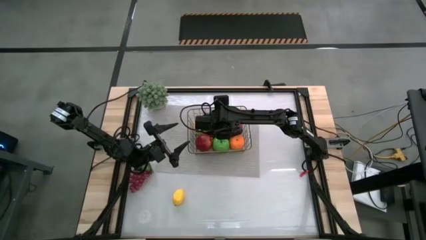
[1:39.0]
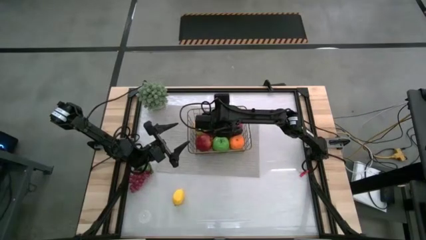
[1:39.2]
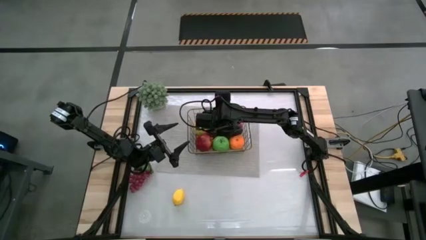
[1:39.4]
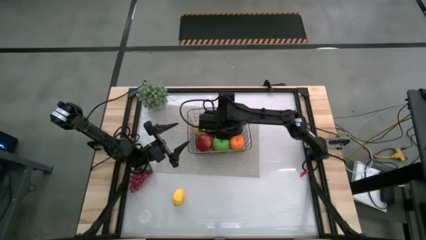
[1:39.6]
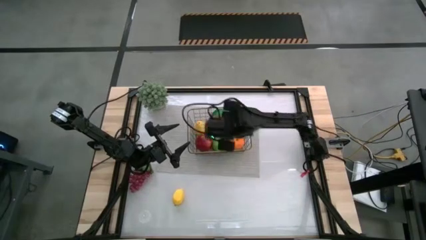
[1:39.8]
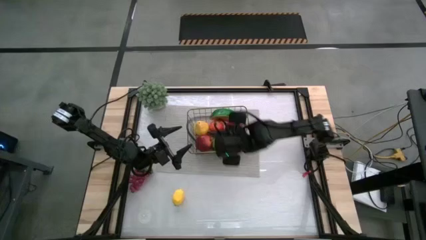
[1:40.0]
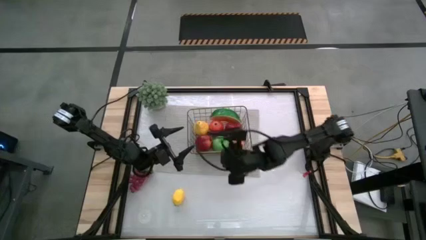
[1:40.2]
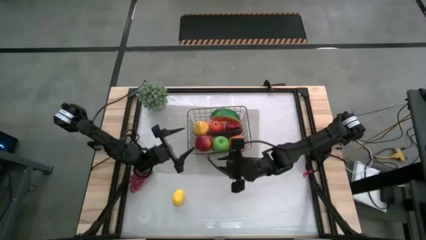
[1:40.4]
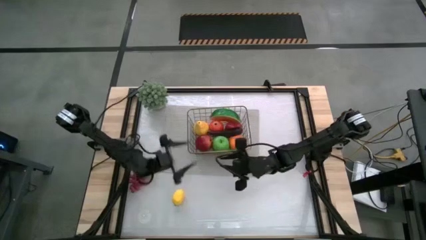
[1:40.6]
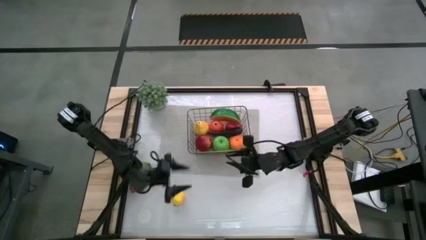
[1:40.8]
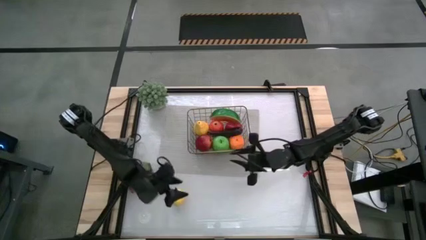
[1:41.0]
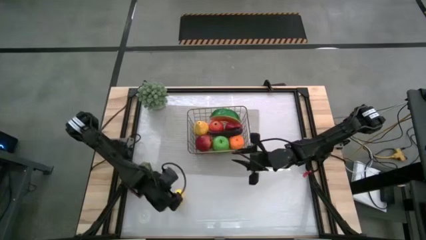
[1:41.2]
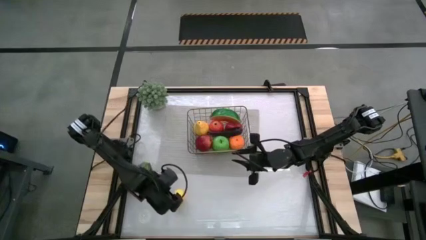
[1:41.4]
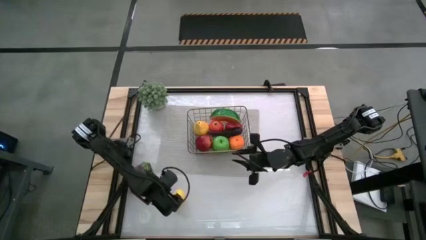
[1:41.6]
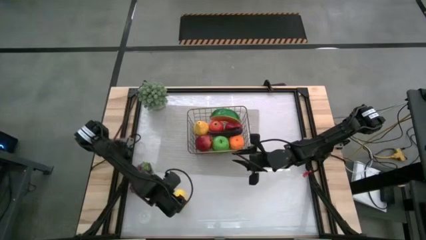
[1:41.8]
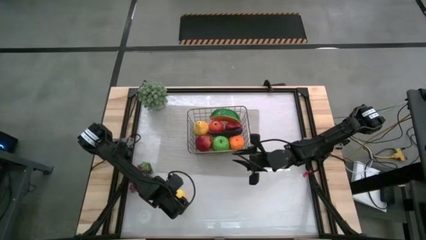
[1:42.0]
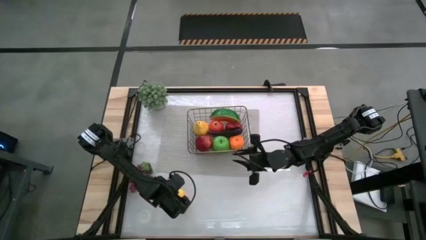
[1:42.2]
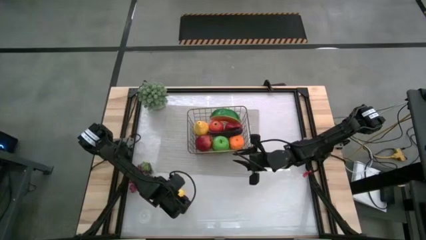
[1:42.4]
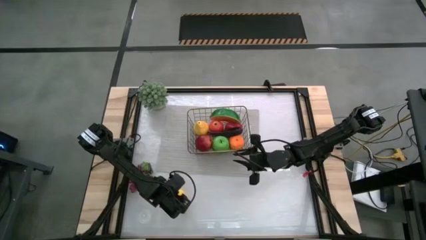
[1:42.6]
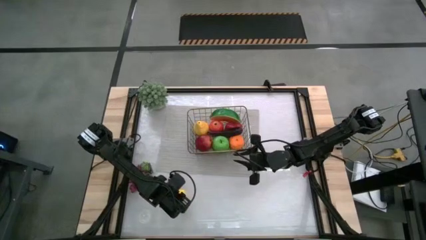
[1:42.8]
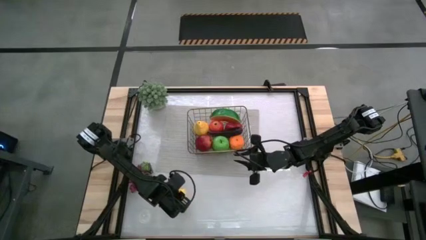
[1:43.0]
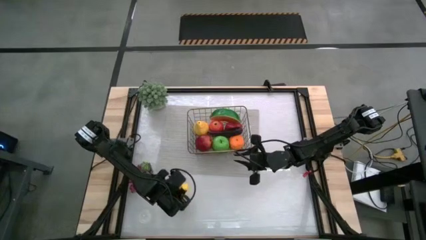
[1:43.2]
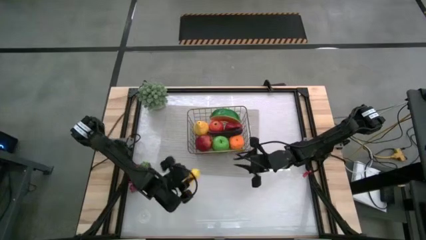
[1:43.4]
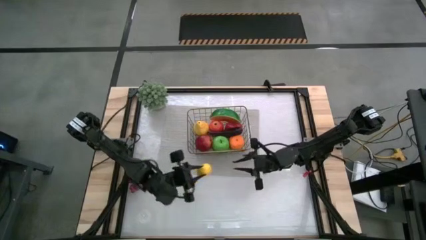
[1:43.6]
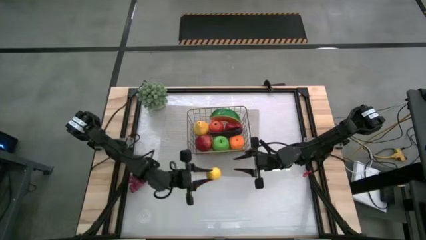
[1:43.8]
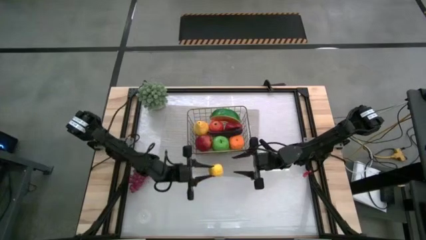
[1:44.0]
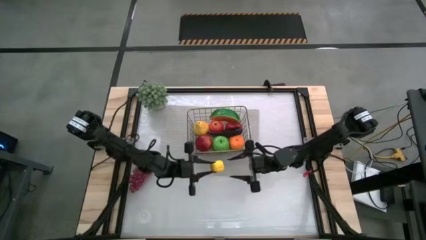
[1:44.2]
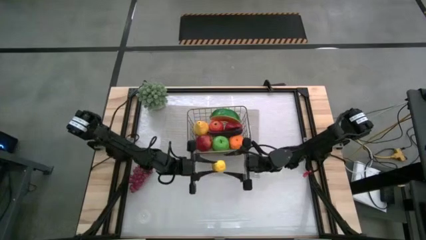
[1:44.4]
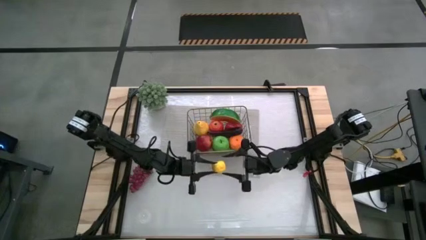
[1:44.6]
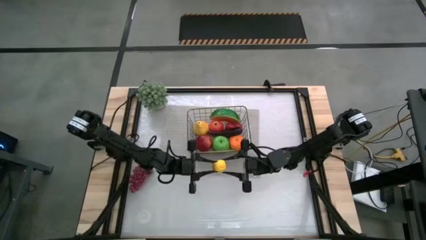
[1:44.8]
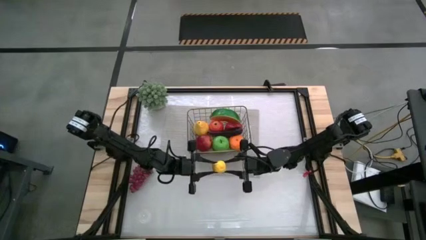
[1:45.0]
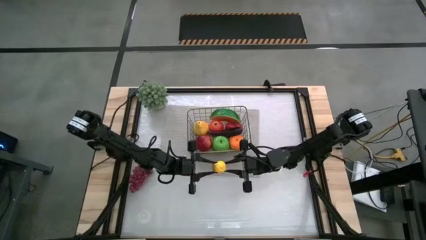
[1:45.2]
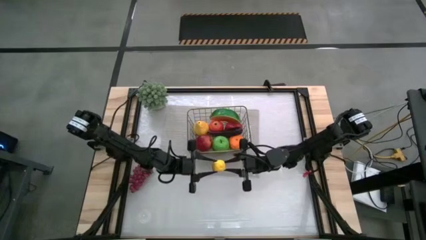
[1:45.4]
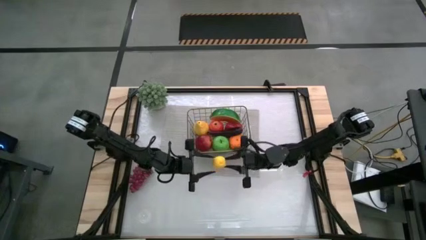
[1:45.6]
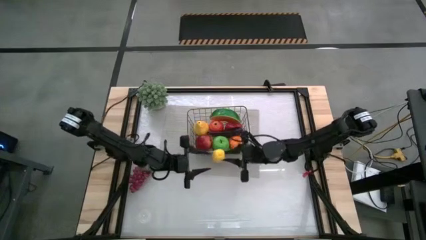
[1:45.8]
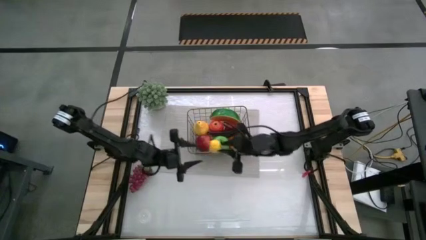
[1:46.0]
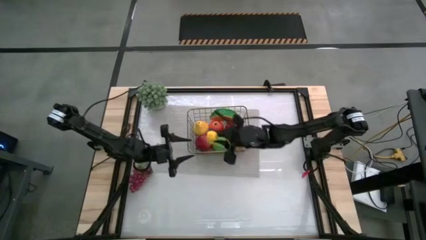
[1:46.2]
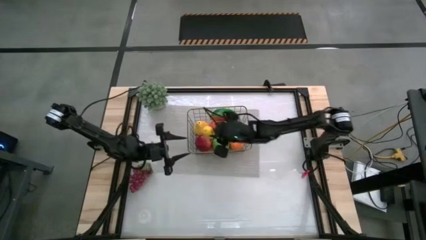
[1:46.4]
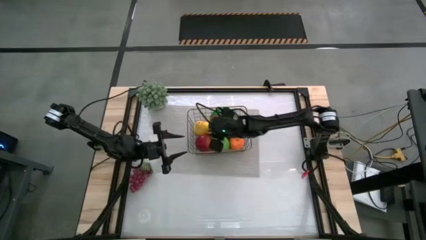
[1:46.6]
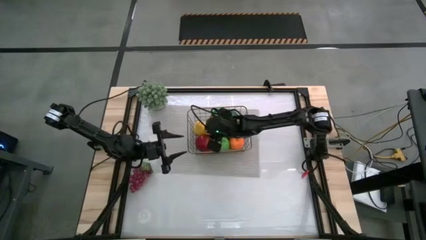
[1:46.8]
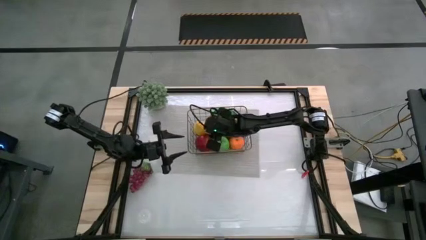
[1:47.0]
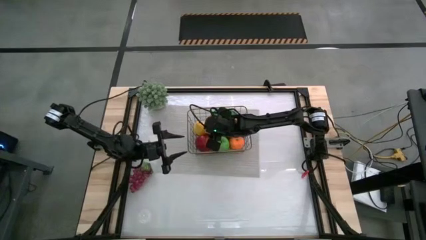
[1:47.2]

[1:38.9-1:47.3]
Task: Build produce basket
Put the lemon into the wire basket

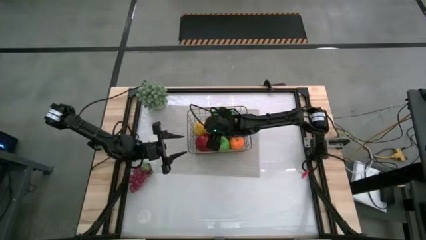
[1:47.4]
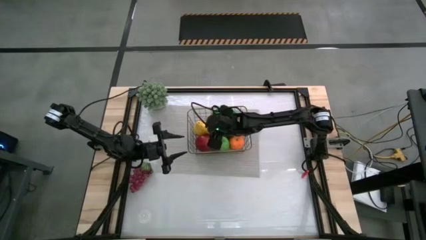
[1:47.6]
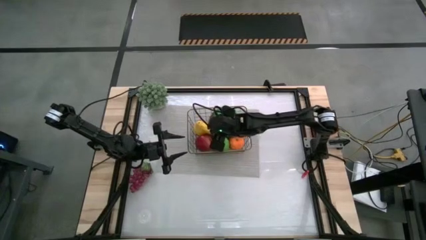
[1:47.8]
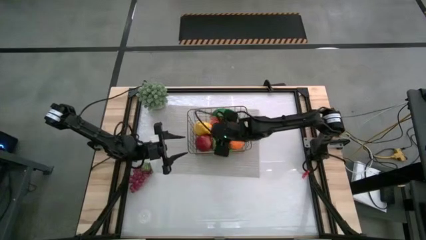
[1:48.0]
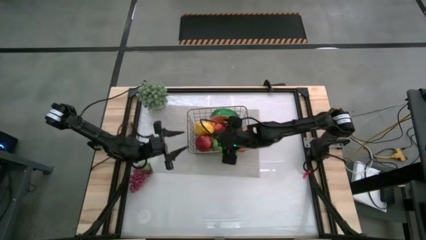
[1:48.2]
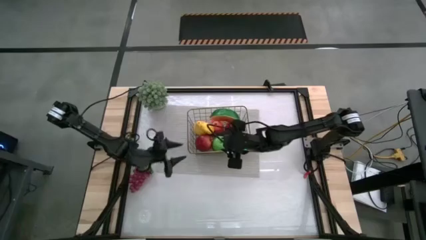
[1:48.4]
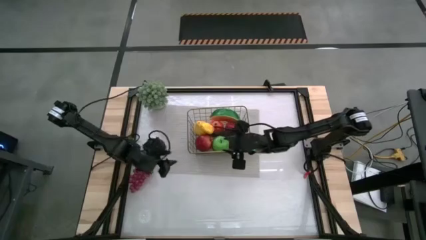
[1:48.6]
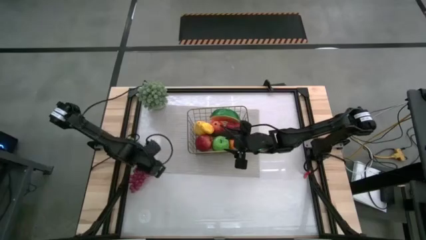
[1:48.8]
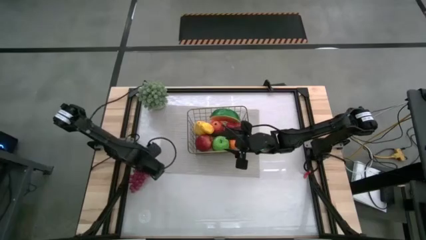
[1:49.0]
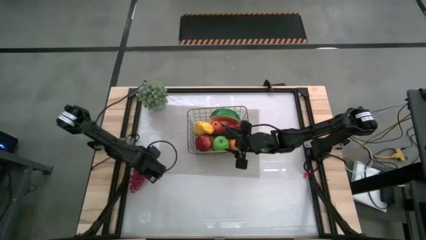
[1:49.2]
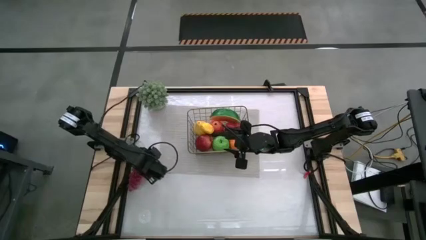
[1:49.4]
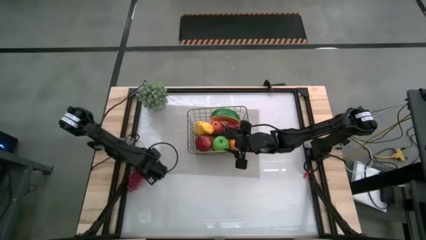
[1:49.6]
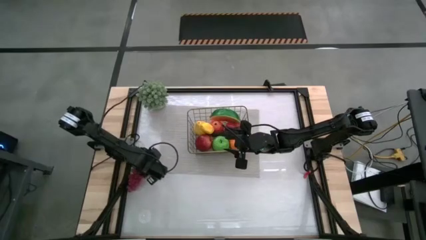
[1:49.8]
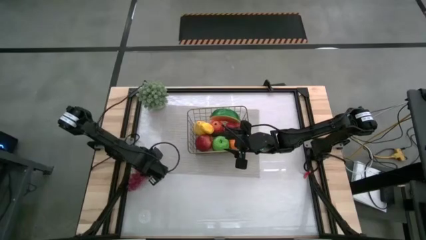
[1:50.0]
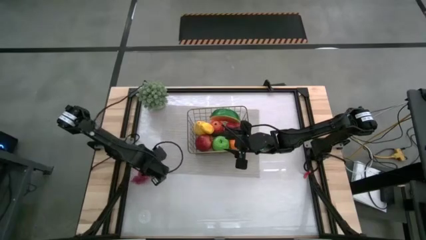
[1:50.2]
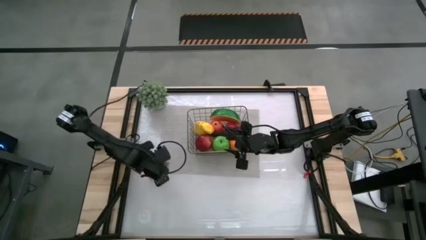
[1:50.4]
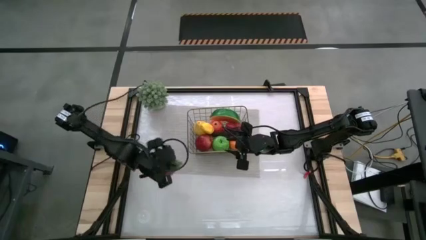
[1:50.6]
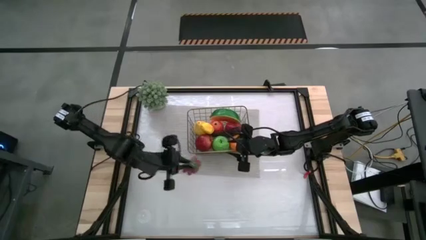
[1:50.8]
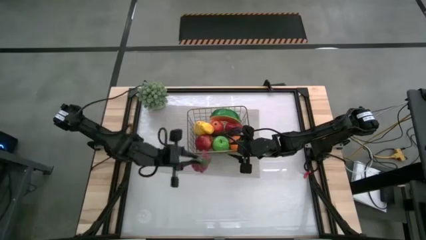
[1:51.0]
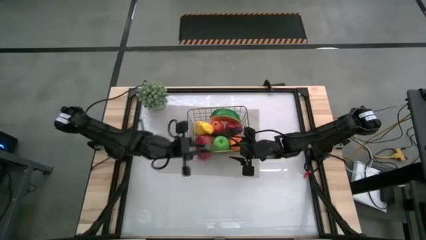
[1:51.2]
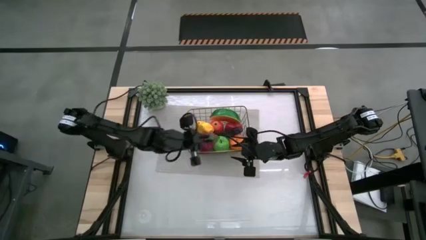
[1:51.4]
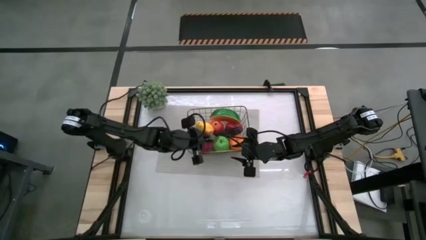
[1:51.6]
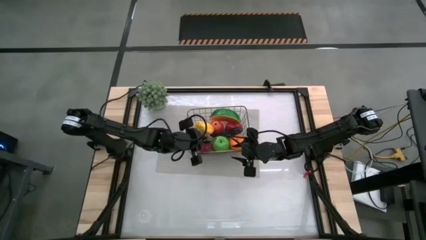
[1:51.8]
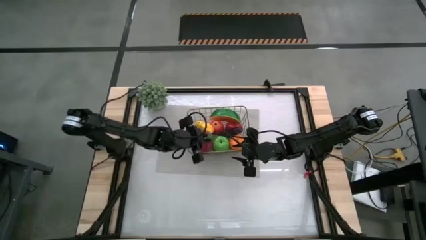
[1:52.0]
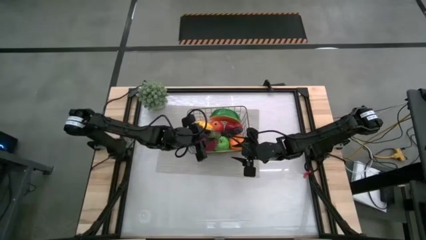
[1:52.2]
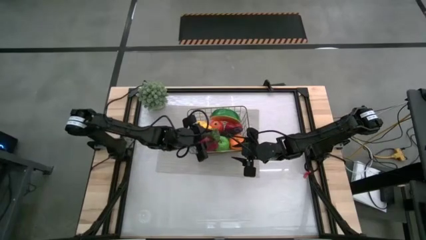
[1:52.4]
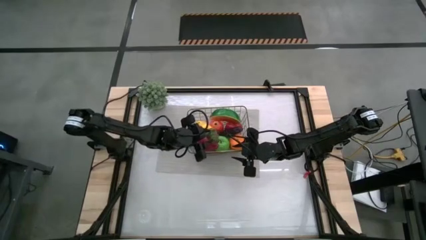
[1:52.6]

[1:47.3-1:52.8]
Put the grapes into the wire basket

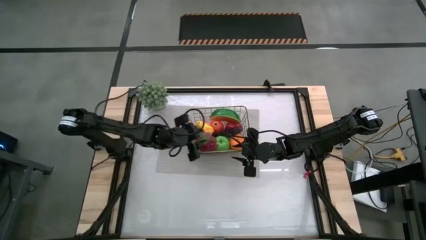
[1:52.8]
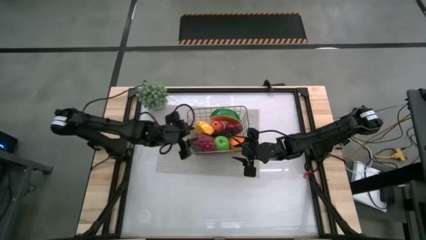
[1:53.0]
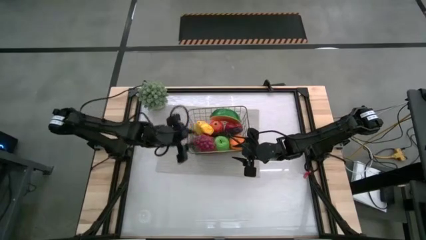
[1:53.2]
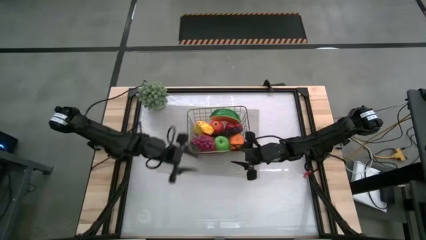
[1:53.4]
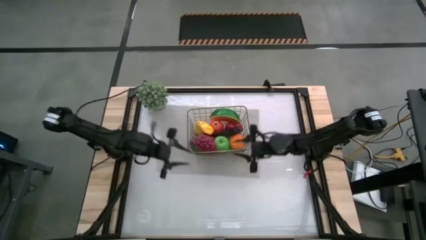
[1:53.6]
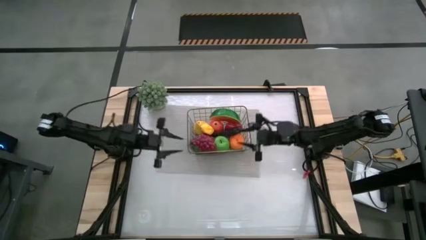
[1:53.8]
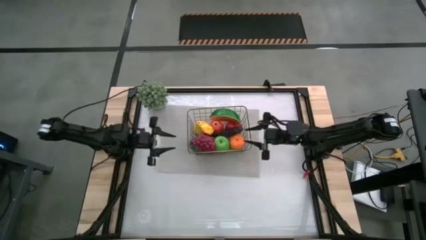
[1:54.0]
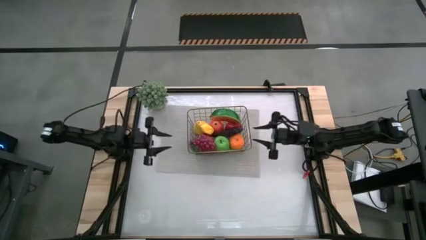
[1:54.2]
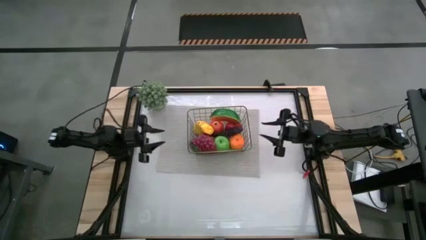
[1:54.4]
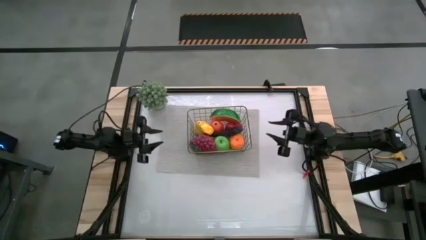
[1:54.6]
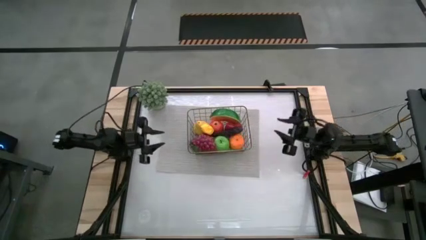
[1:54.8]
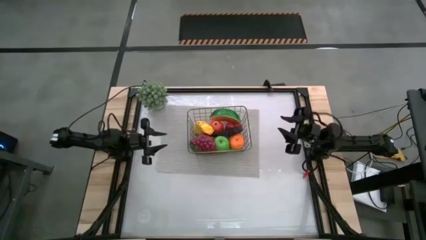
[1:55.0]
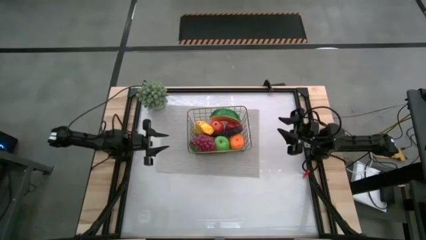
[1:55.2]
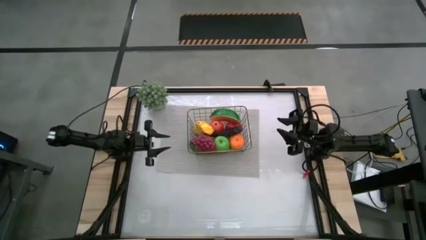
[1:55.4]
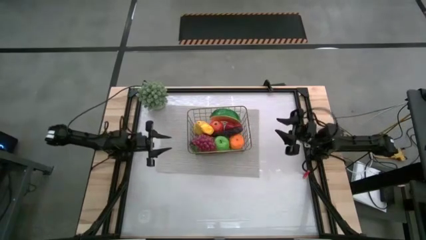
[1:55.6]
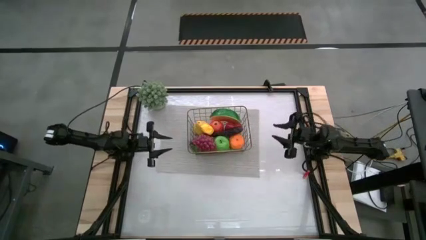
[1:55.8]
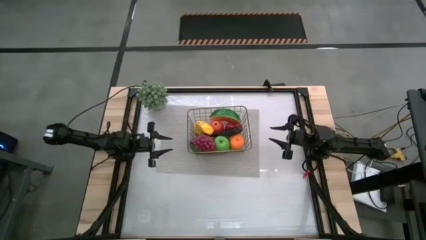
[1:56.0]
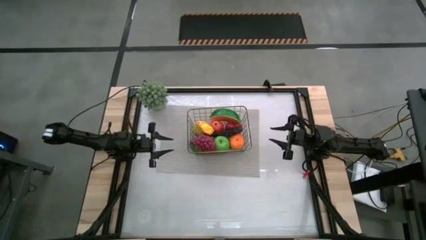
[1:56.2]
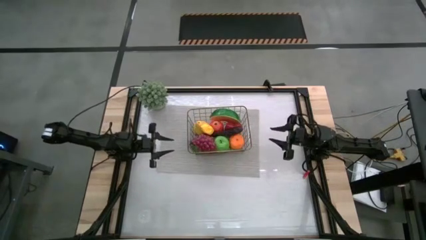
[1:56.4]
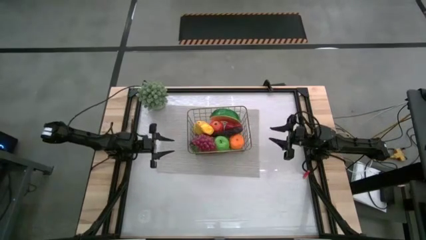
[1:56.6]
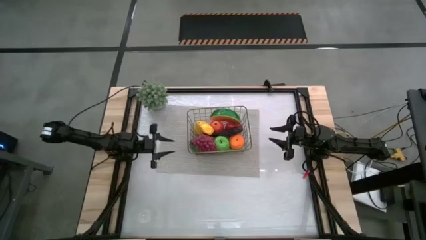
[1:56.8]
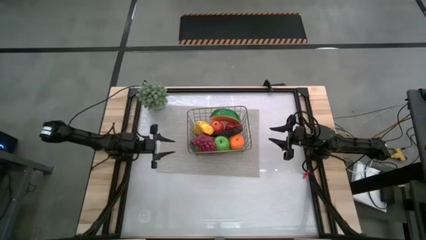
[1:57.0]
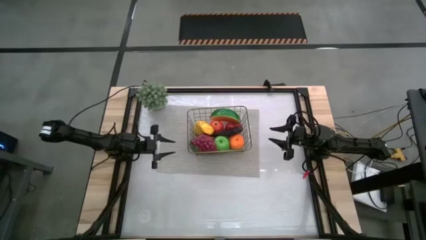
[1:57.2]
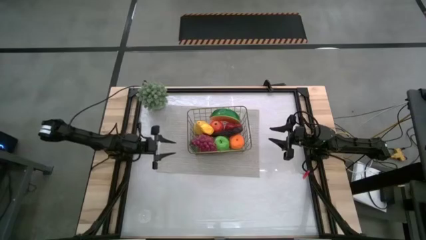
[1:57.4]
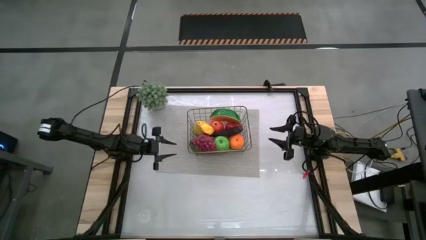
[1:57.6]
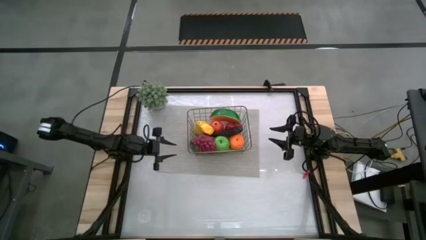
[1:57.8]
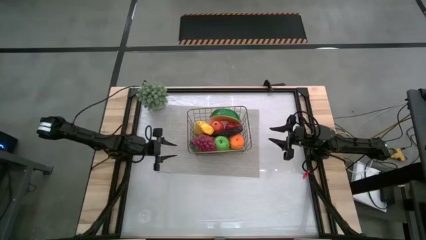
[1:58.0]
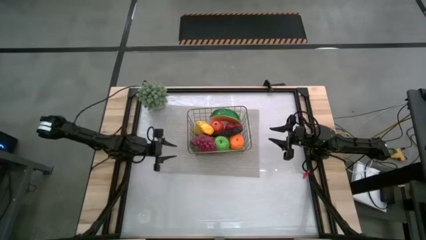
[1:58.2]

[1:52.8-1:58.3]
Return to Home Position
